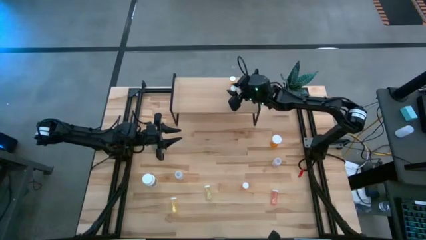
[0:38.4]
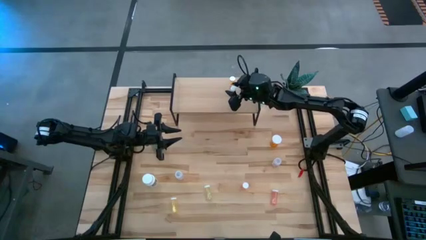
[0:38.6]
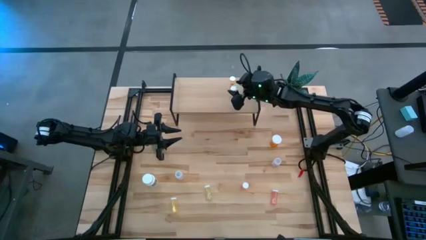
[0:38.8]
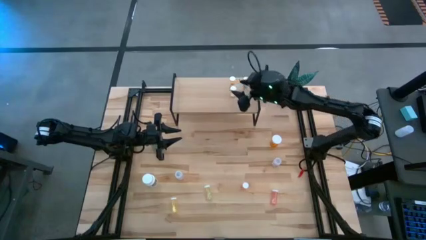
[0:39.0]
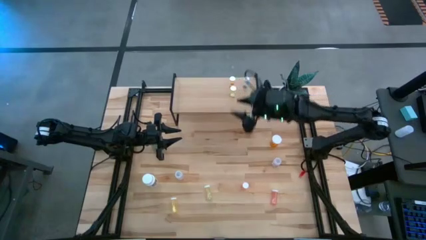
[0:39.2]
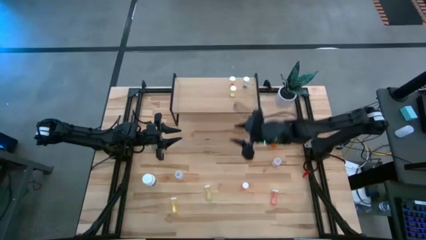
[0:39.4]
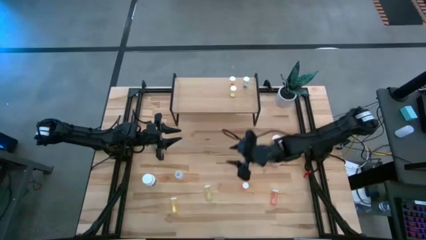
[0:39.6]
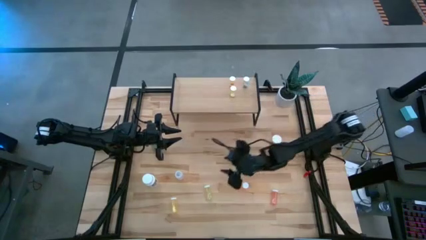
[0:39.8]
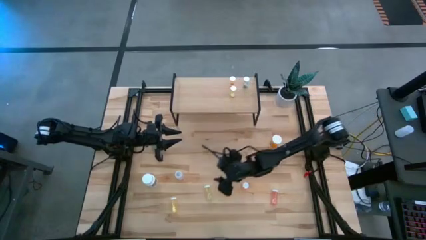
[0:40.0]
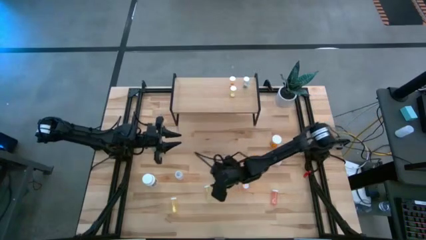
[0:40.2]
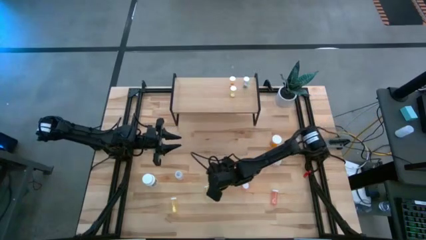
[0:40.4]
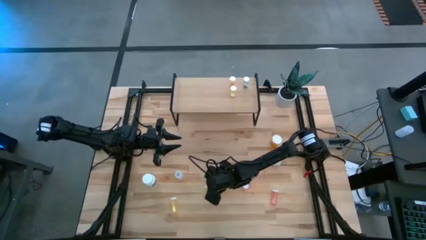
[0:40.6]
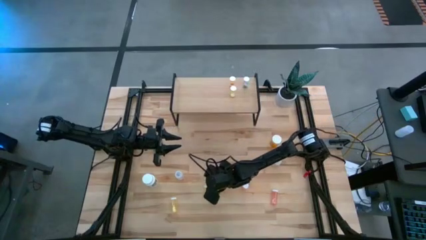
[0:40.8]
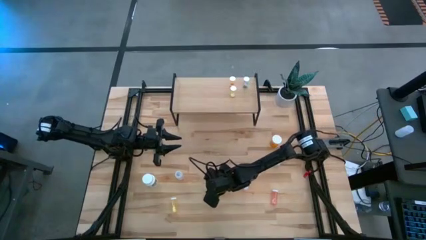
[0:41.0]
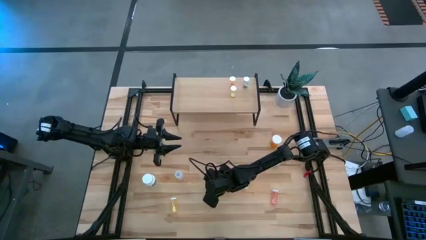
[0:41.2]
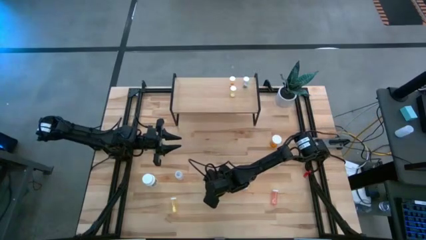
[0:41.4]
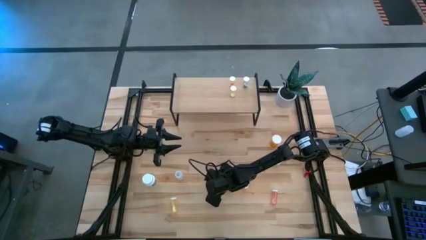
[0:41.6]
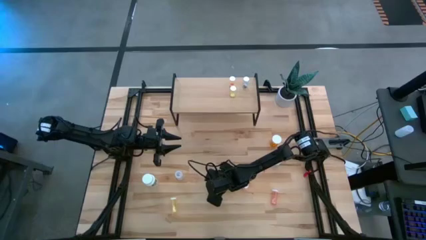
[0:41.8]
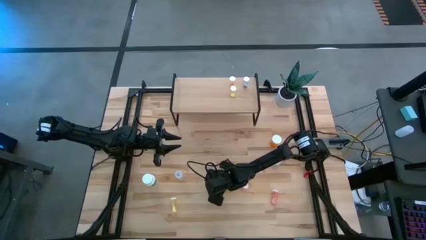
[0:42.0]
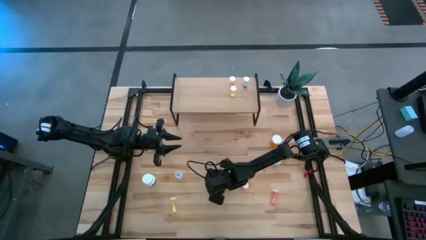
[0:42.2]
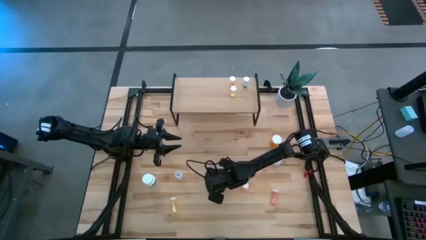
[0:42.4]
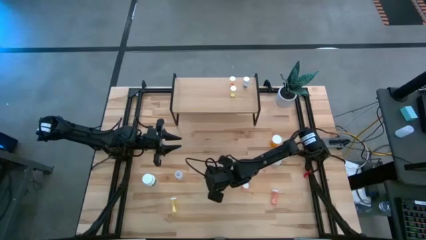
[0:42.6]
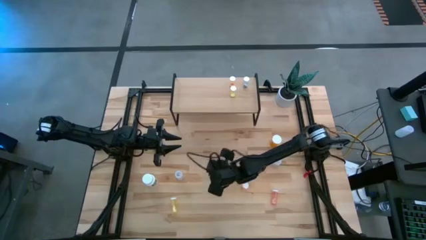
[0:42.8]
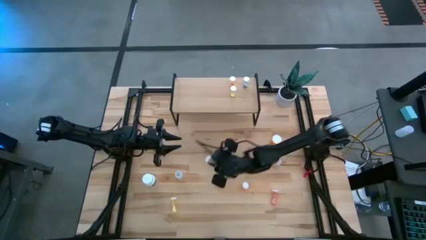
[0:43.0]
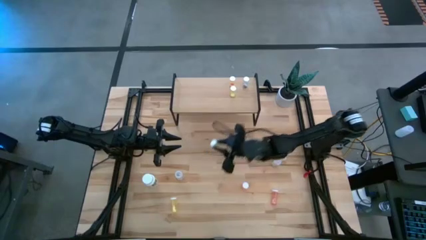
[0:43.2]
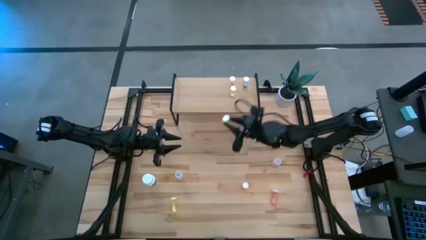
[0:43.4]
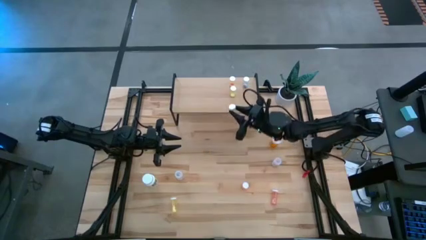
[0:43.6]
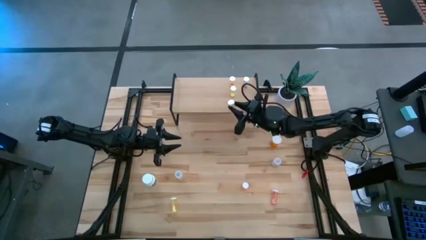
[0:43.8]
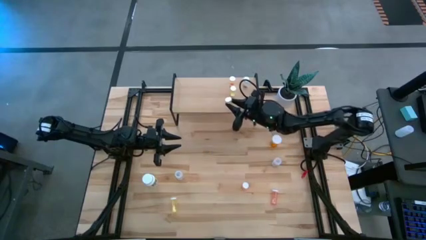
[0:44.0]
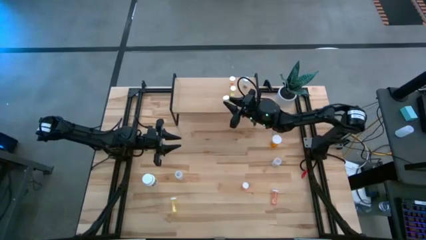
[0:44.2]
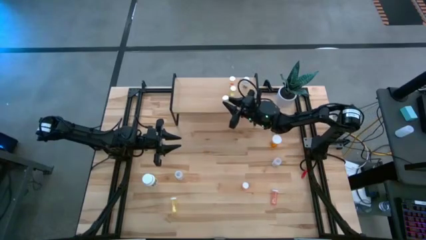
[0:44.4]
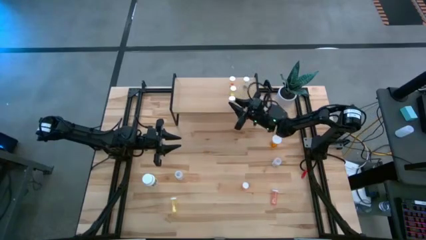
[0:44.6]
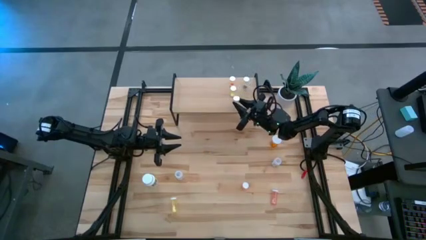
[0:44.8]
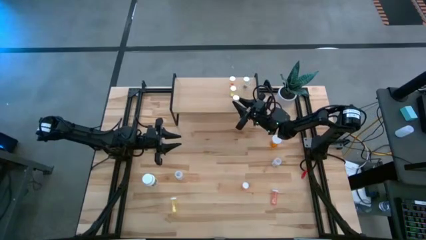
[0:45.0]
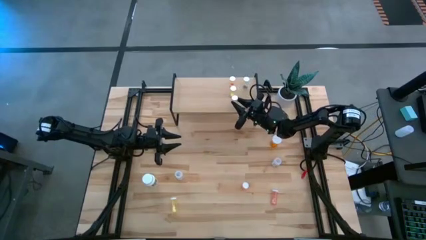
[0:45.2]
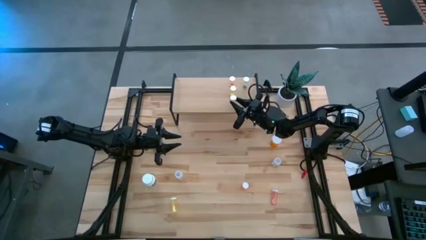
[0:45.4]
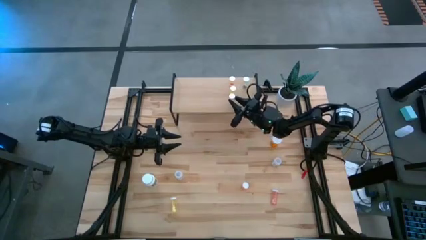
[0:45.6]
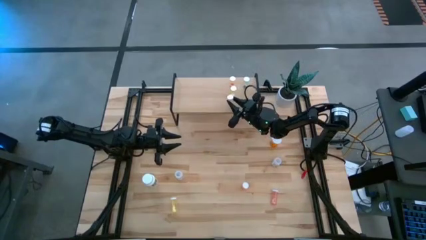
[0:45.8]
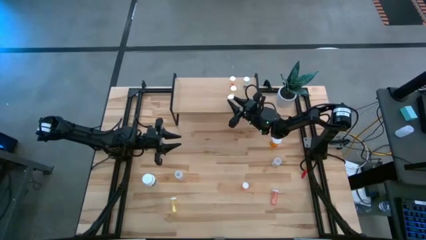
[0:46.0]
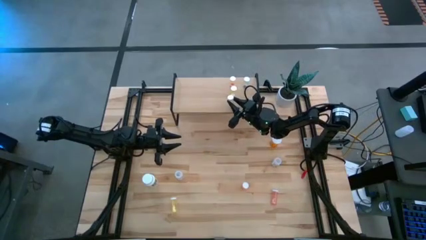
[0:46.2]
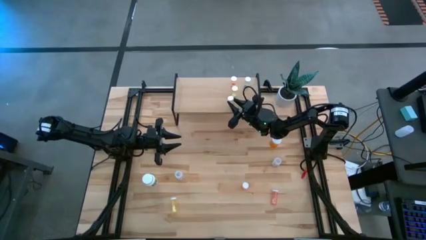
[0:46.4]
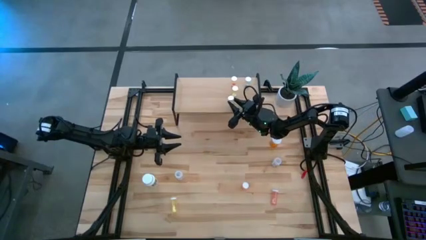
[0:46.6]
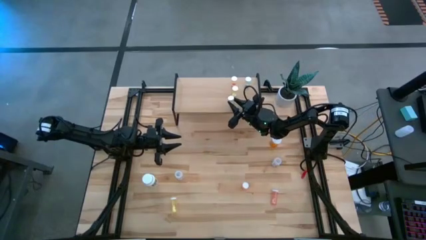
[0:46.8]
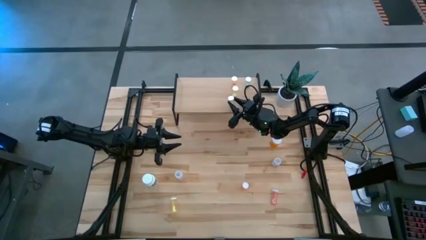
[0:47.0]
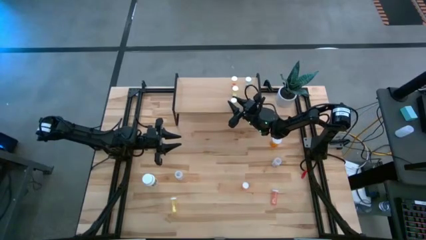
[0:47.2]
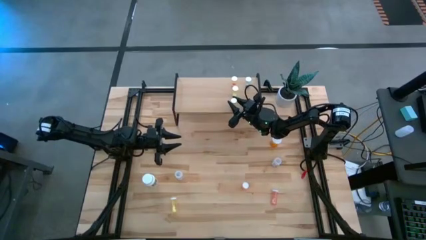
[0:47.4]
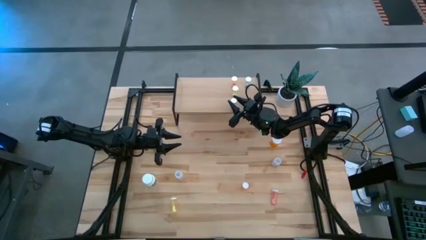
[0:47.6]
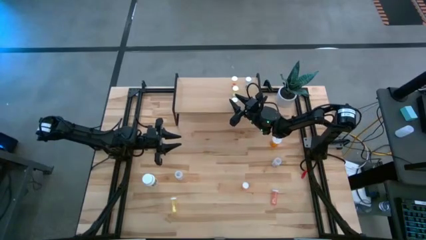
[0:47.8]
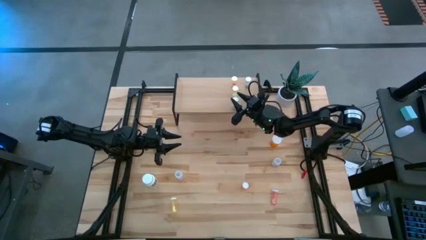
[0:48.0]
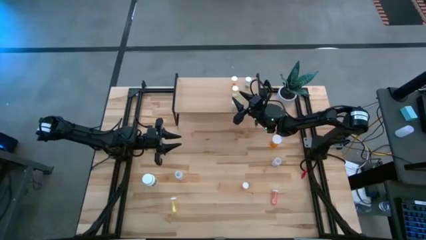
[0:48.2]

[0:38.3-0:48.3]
Task: Pick and place medicine bottles onto shelf by color
Put the right yellow pill bottle on the shelf
